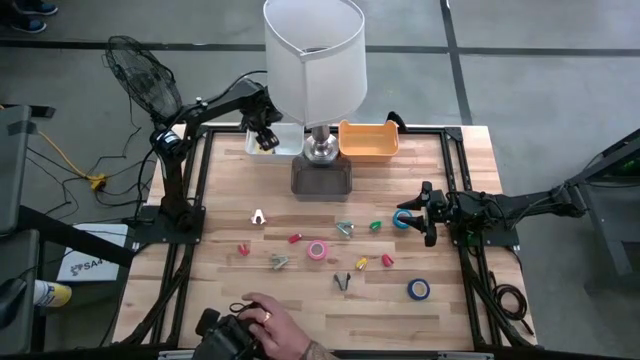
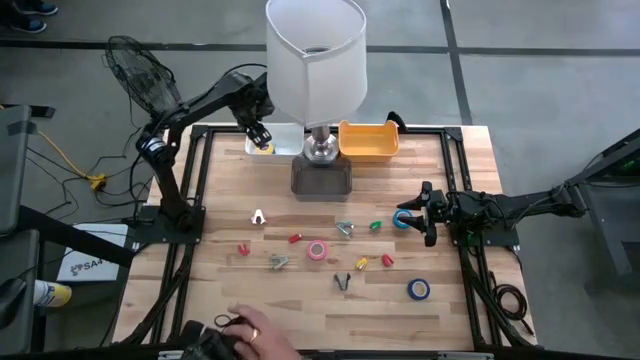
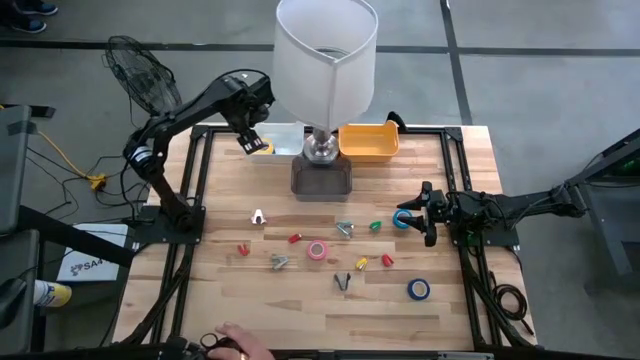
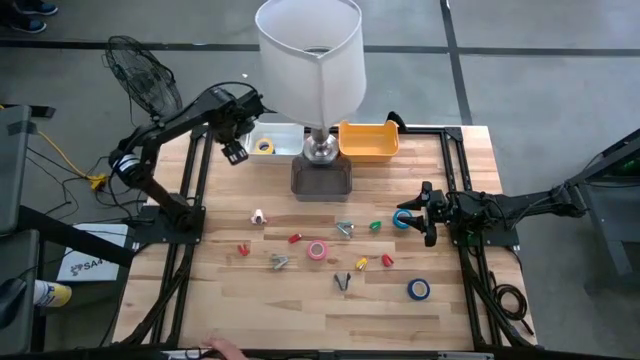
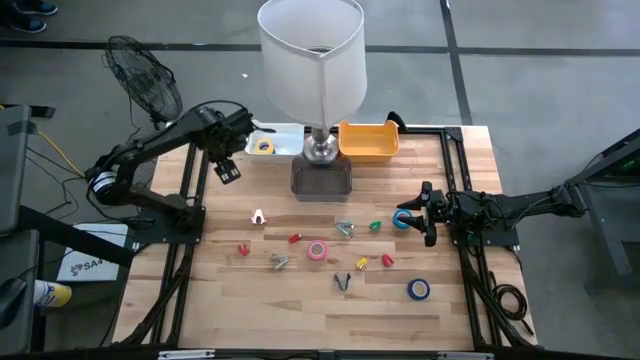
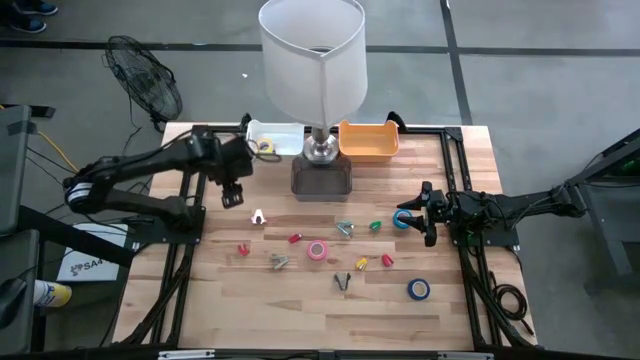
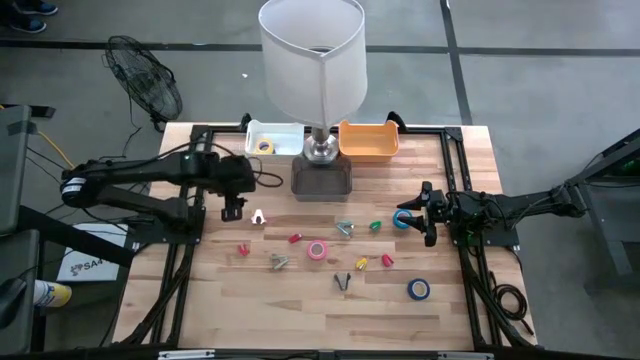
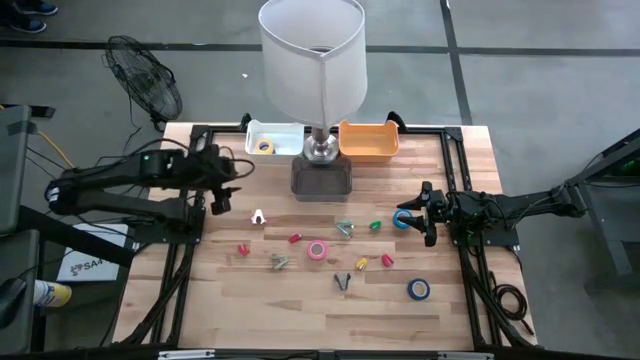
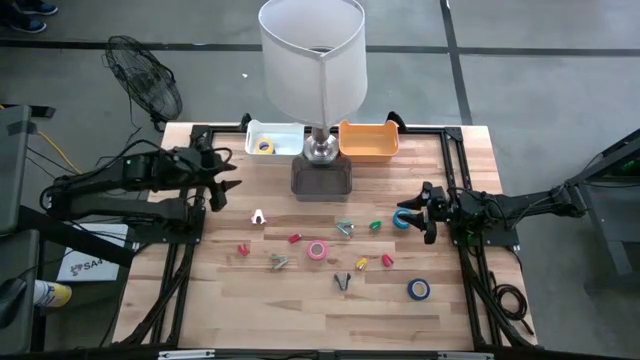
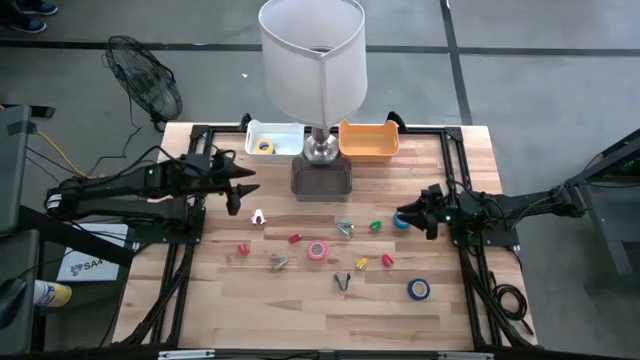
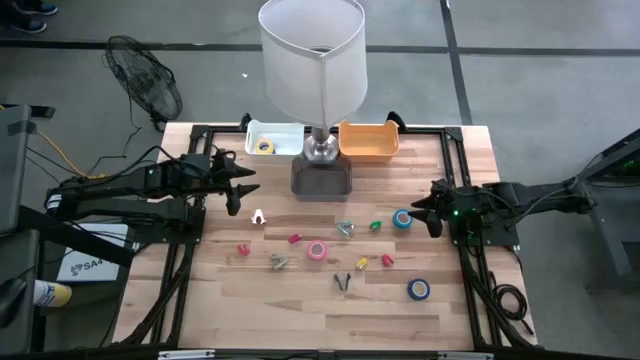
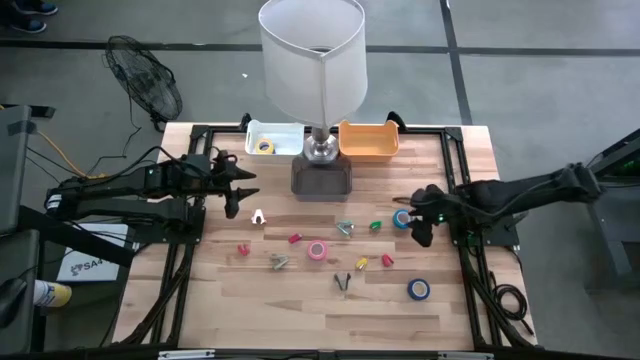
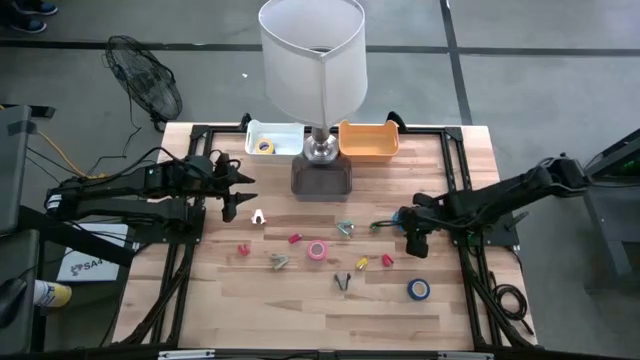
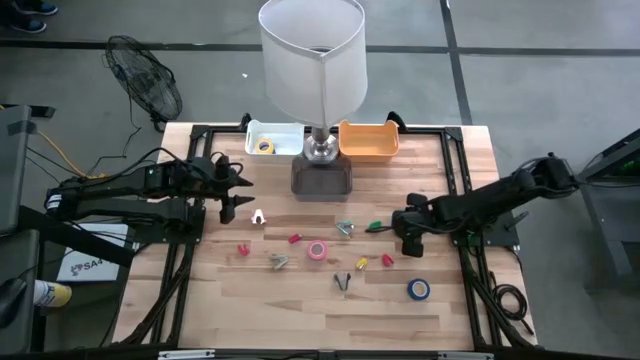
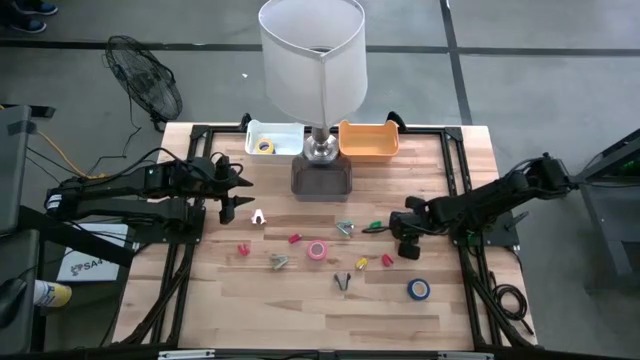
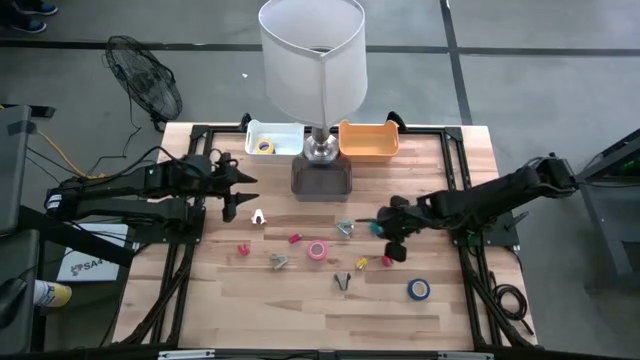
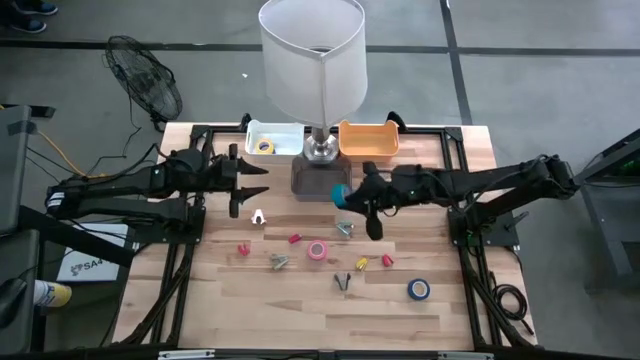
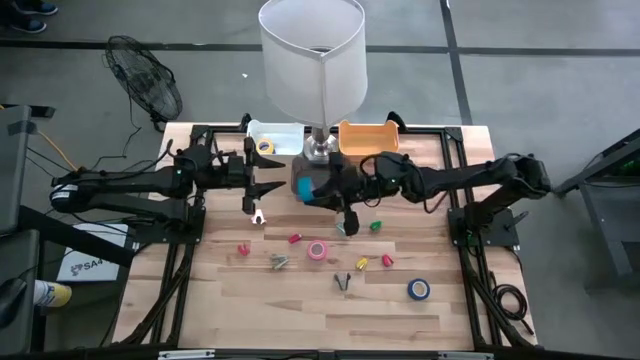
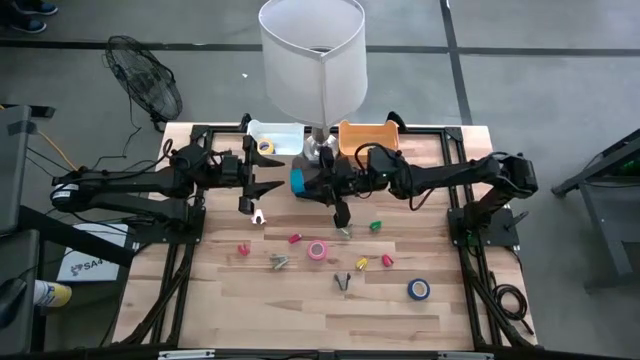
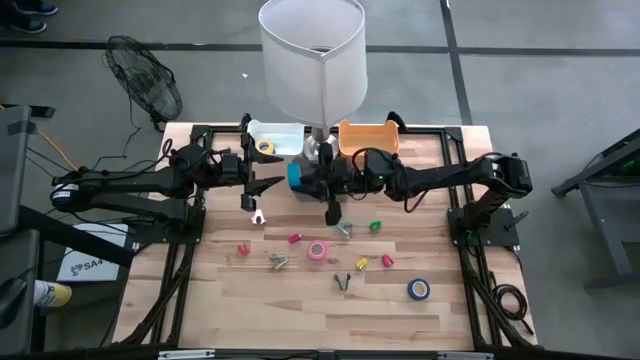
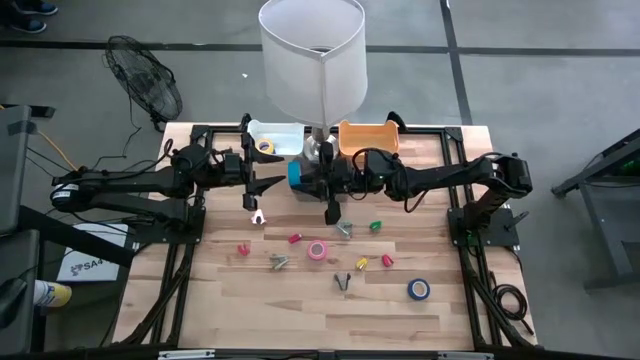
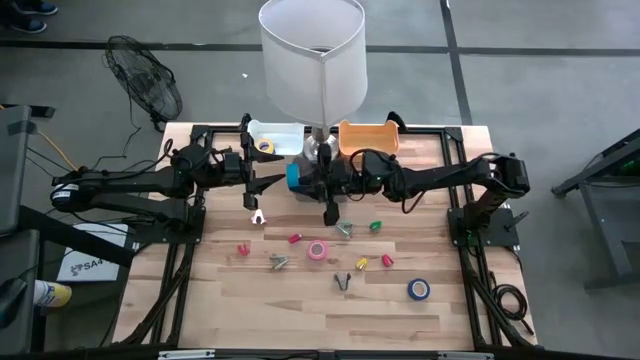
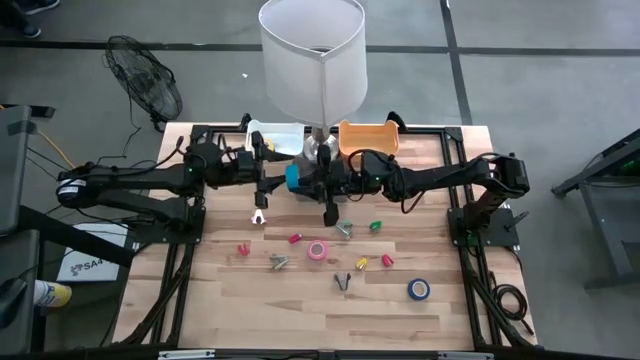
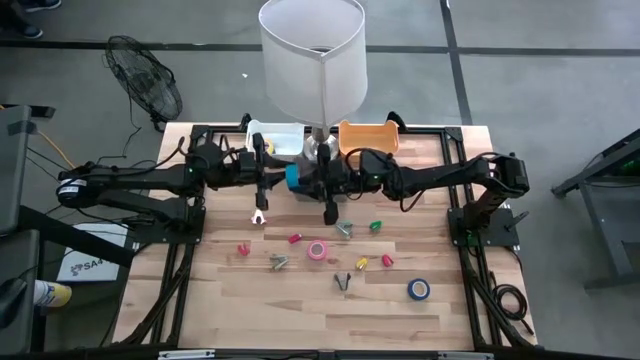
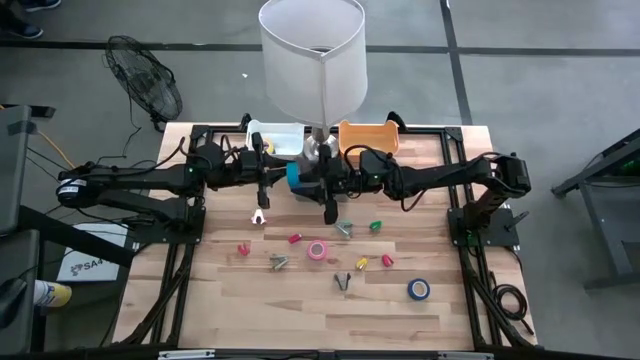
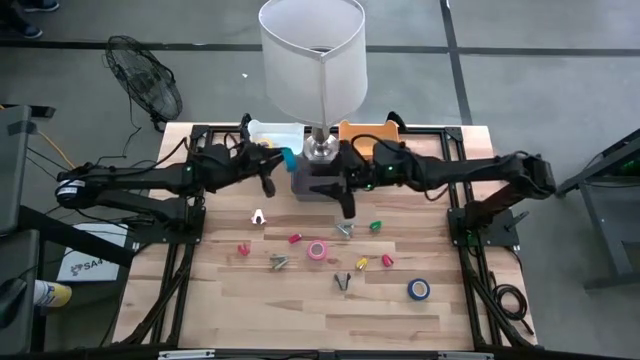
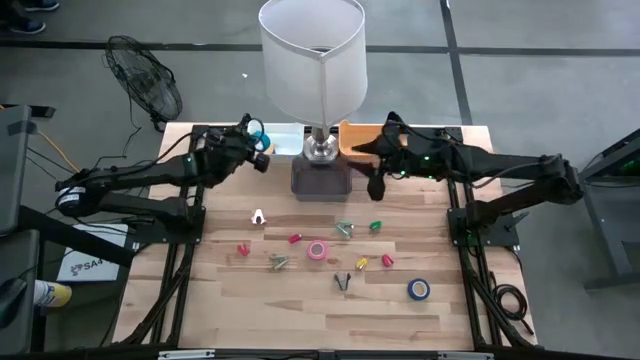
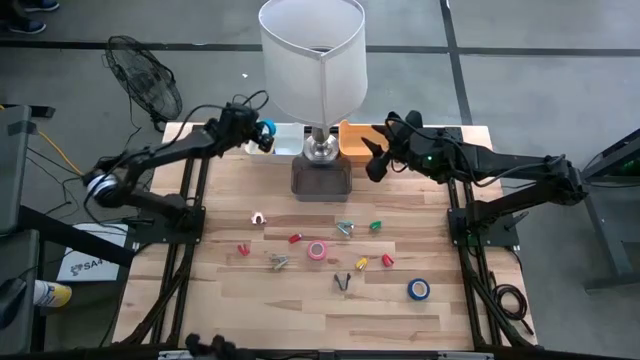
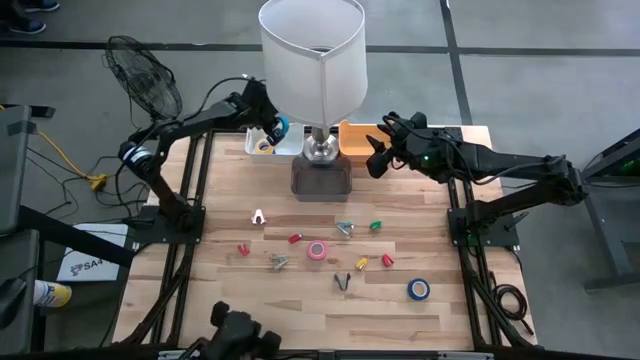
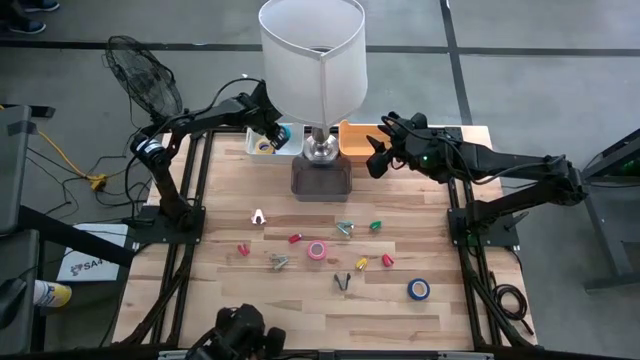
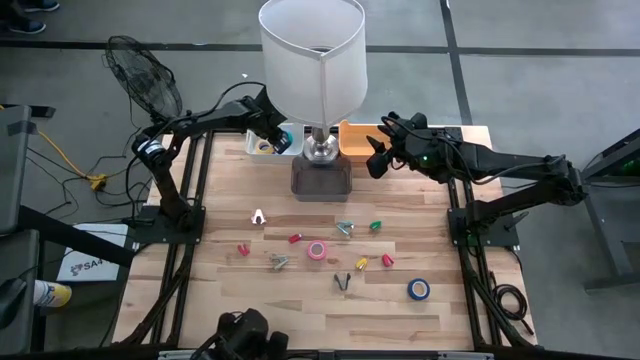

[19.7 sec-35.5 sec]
Task: Pick and place Stapler, Stapler remover, tape
Put the light blue tape into the white bin

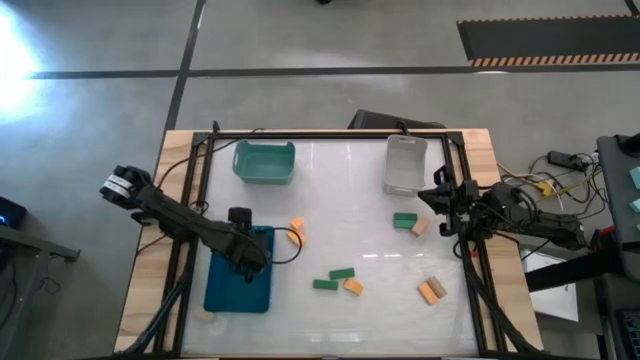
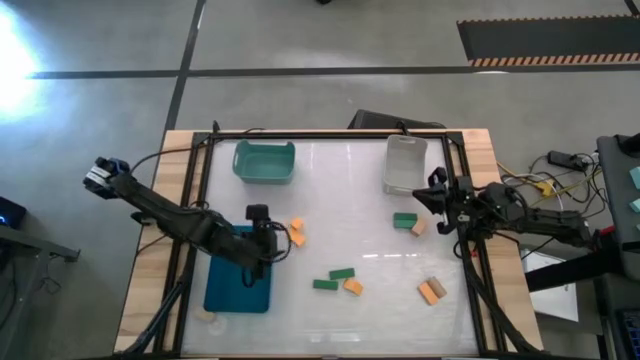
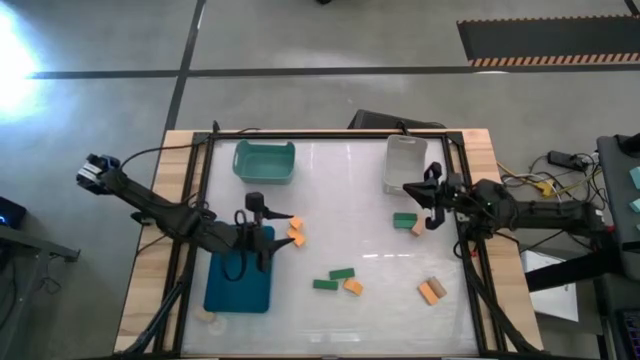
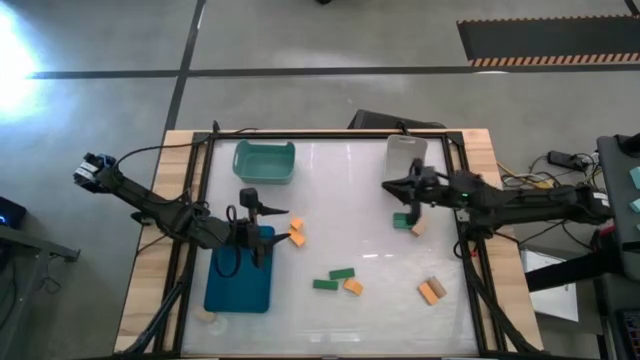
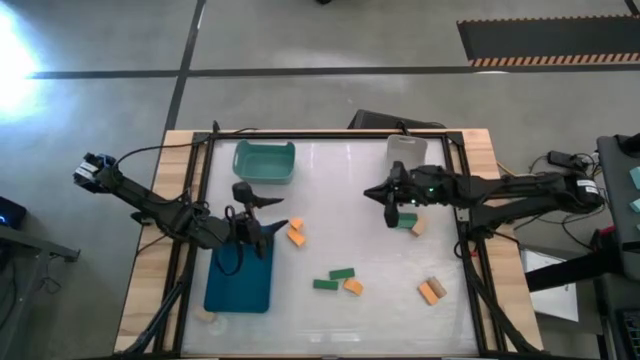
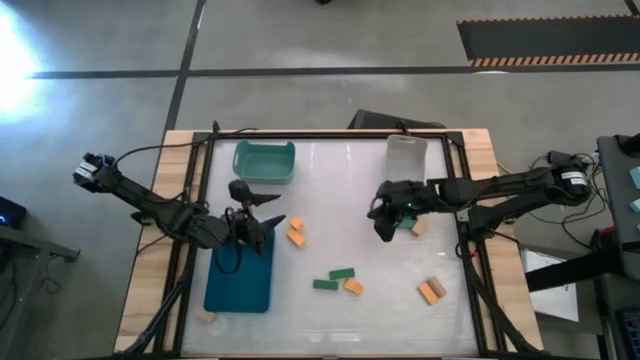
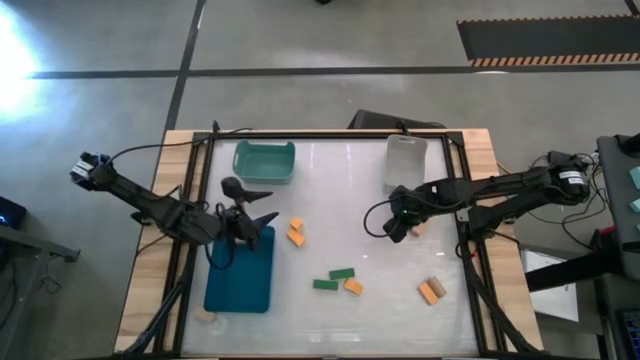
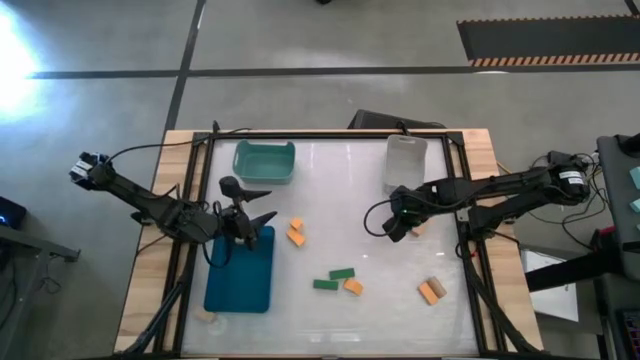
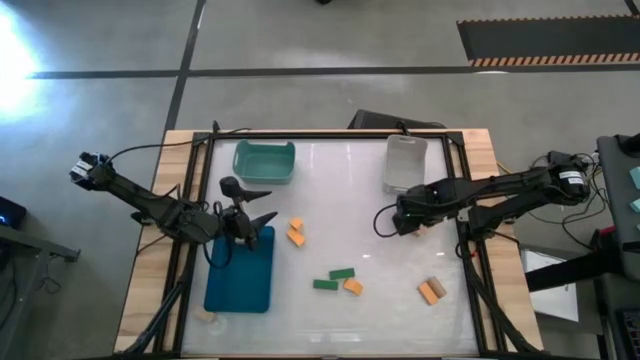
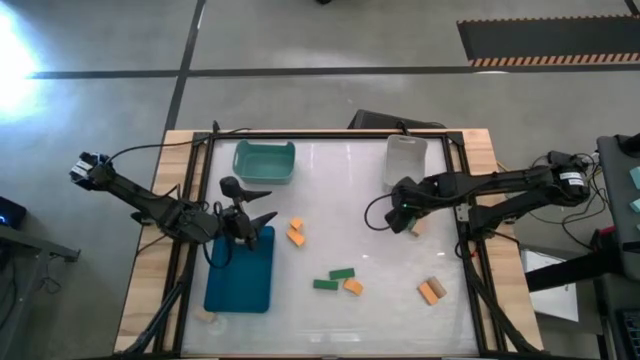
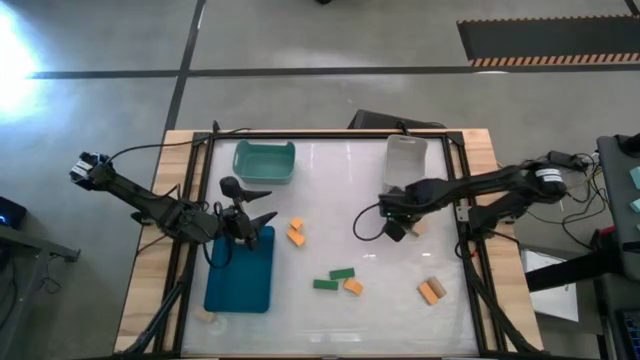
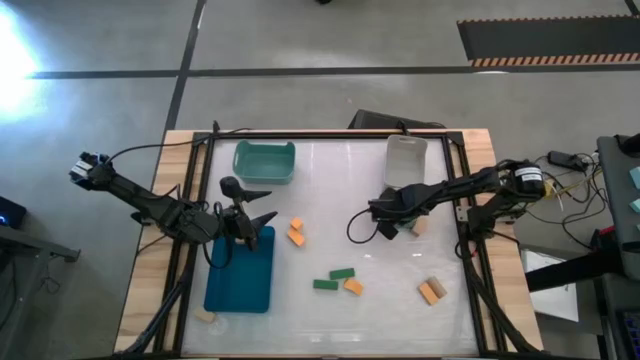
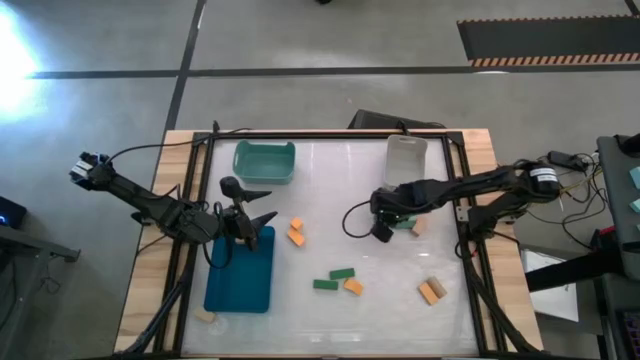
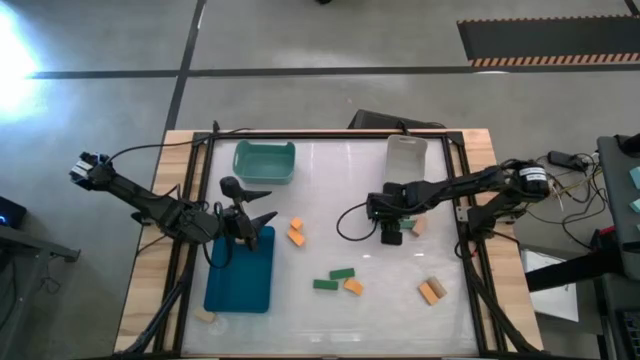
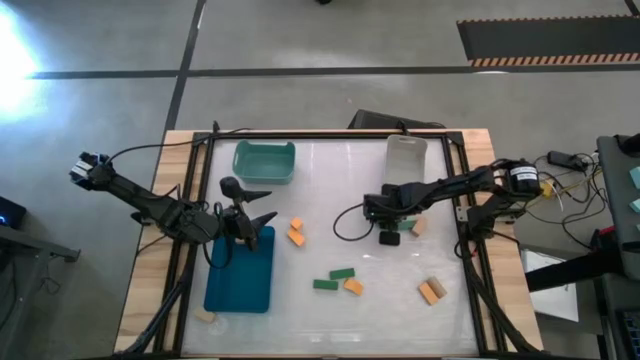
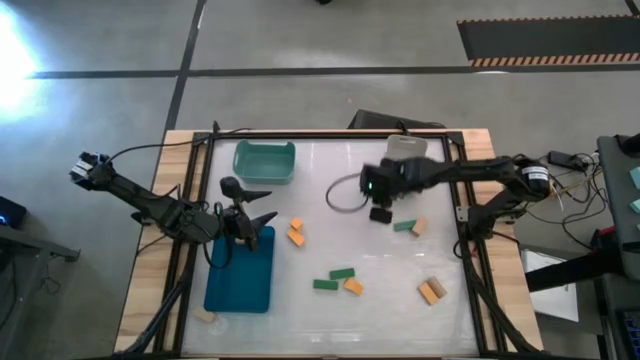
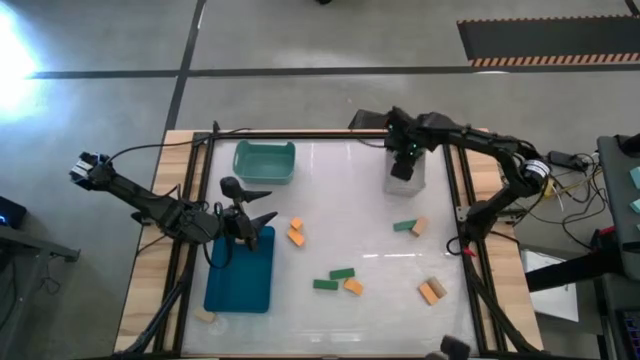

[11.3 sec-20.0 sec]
Task: Sort & place blocks by color
Put the green block into the gray bin
